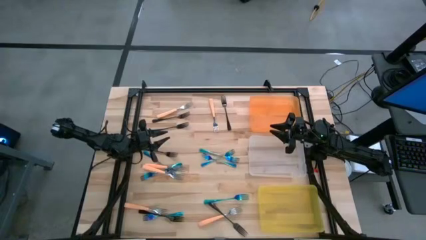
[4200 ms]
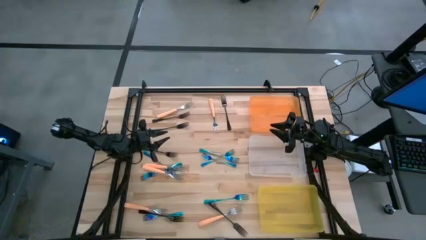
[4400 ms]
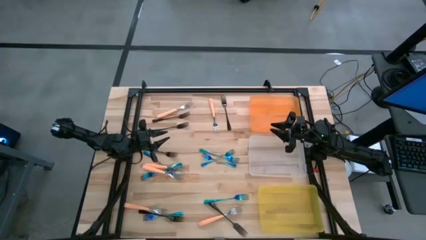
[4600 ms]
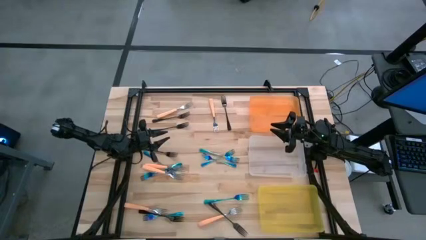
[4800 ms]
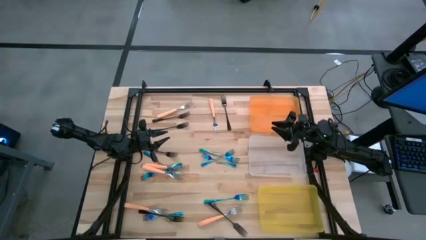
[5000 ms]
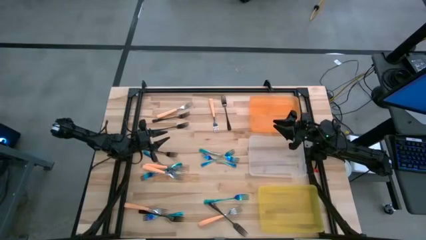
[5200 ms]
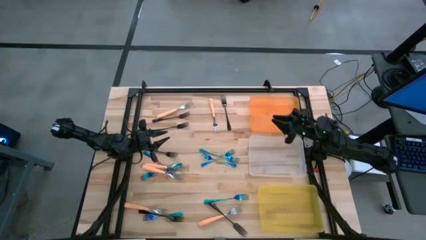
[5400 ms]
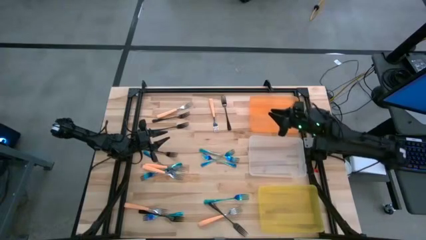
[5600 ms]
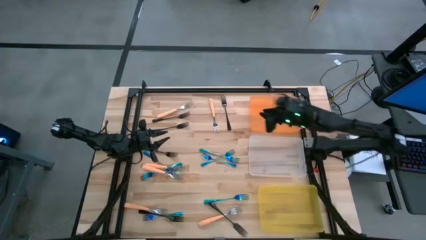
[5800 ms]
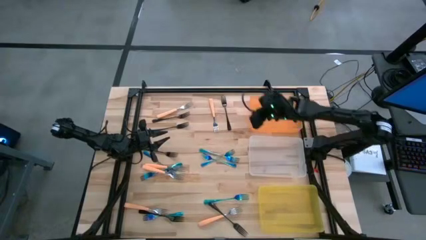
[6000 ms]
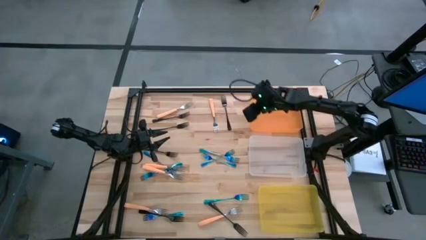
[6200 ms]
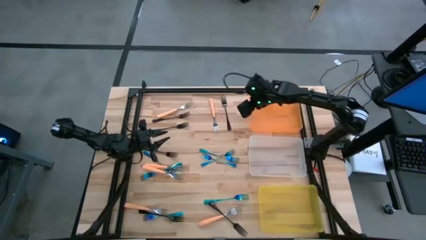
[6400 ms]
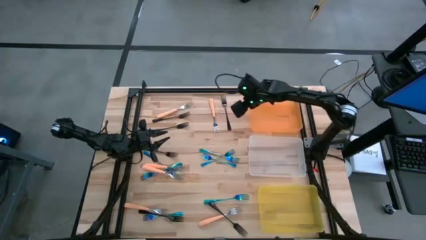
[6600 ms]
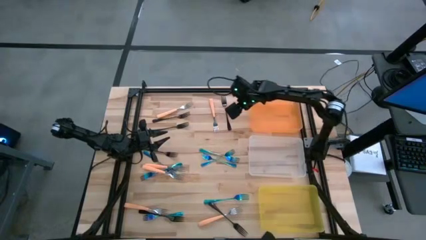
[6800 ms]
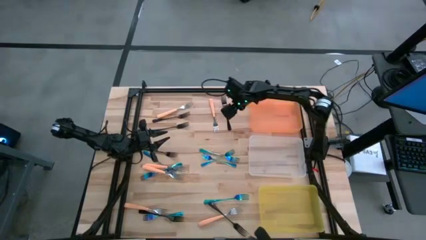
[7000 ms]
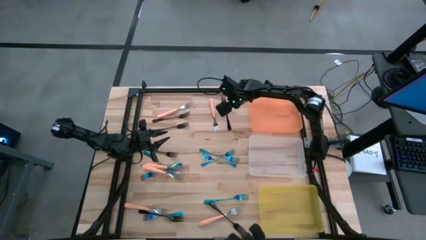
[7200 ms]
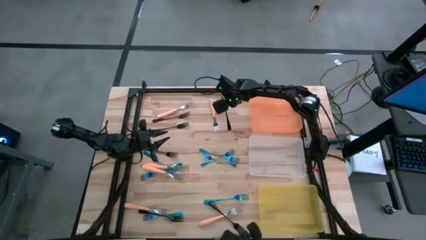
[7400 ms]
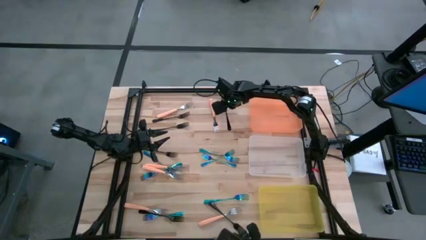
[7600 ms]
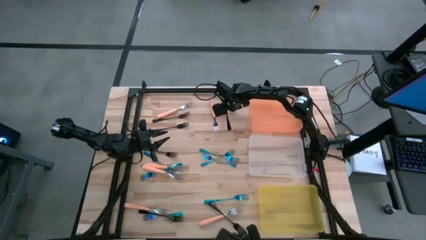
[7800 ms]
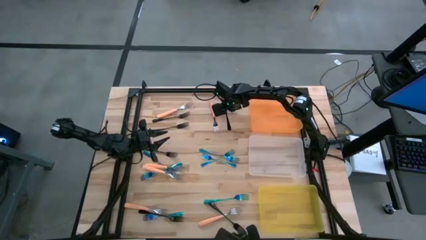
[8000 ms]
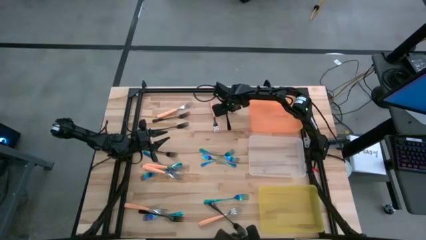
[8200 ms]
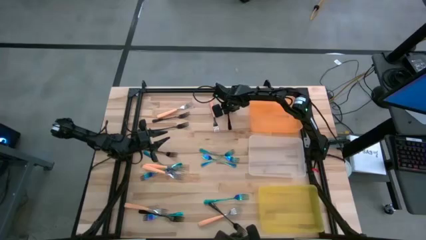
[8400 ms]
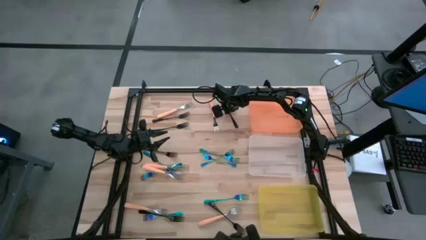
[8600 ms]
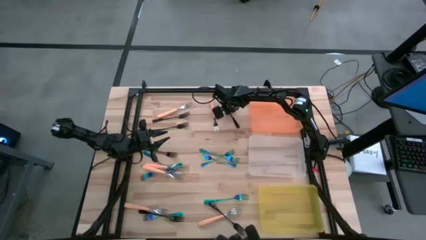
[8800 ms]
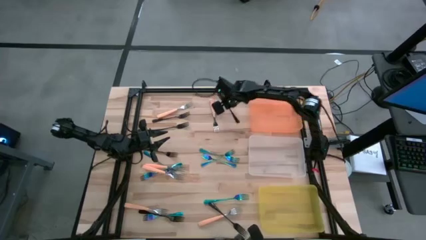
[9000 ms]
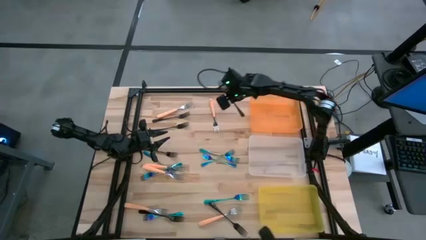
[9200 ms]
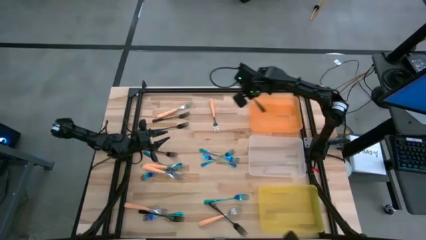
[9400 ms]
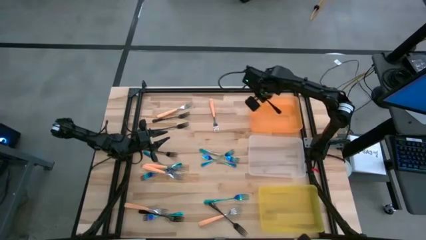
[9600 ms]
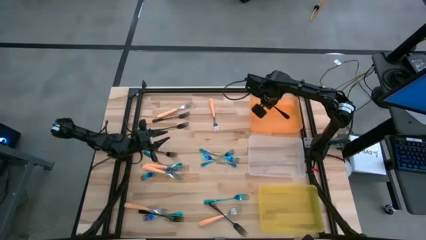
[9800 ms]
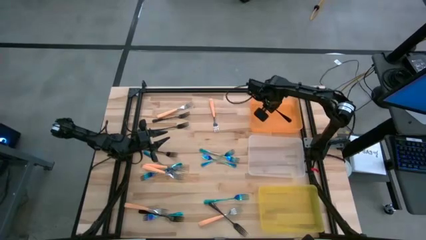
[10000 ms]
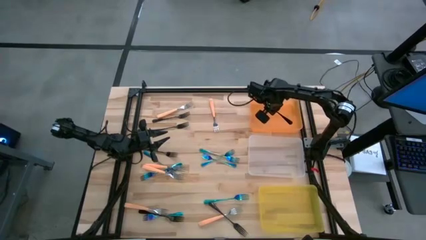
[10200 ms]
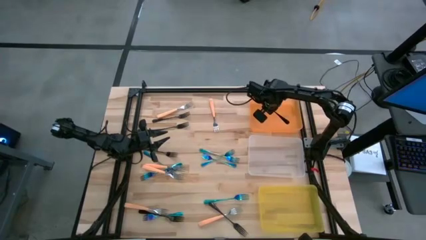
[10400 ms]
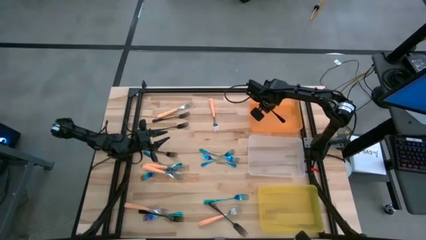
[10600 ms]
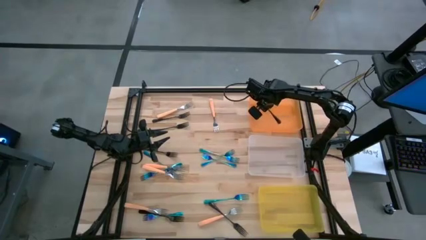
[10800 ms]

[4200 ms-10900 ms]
Task: Sort silverware by color (type)
Put the black fork into the orange bin

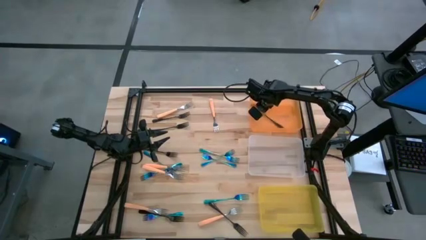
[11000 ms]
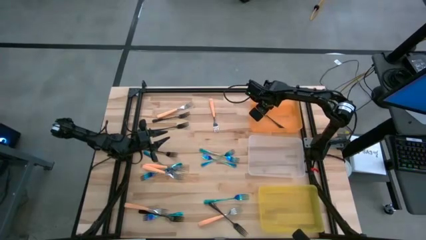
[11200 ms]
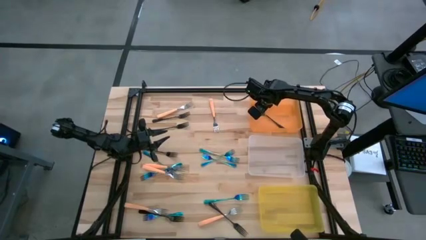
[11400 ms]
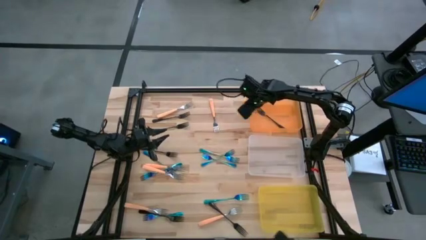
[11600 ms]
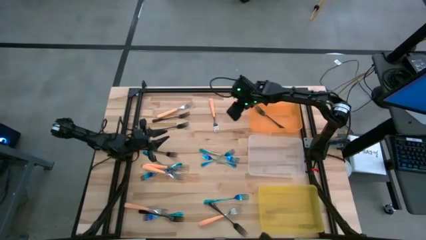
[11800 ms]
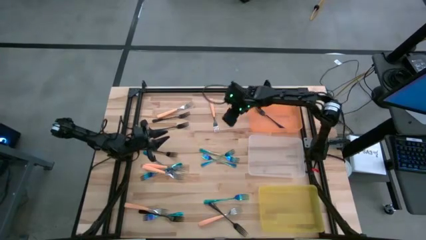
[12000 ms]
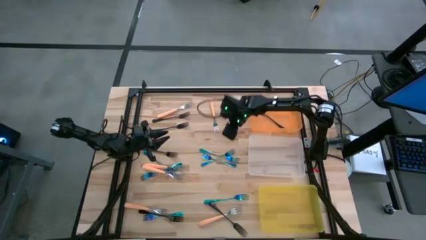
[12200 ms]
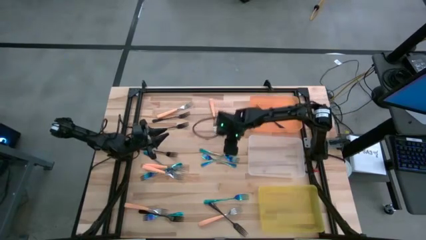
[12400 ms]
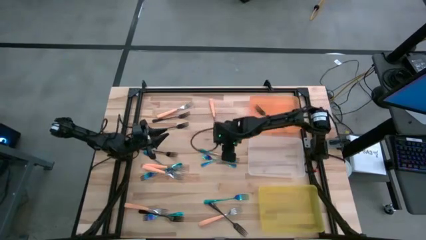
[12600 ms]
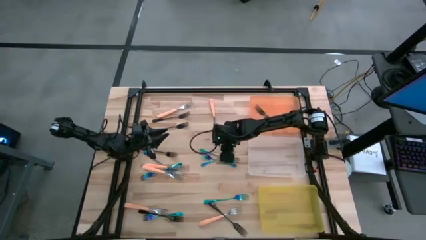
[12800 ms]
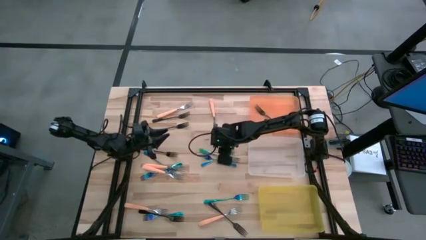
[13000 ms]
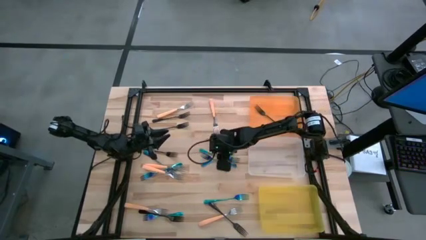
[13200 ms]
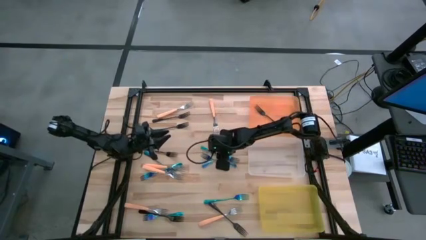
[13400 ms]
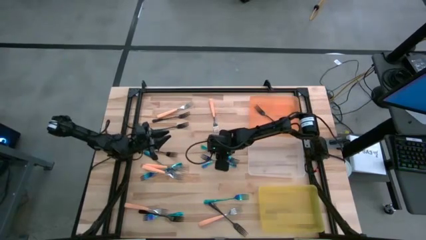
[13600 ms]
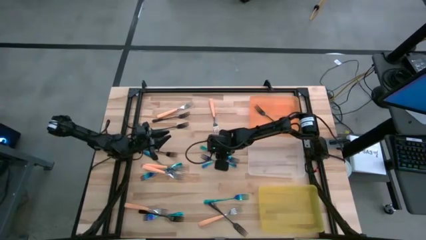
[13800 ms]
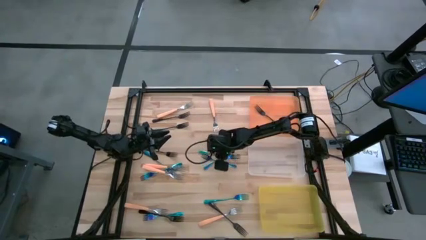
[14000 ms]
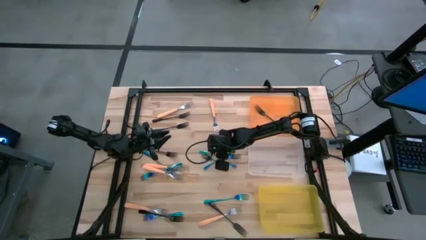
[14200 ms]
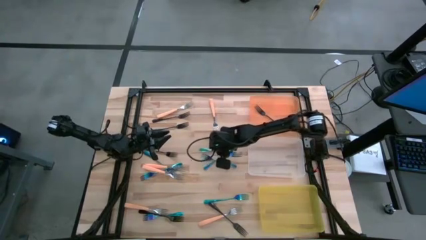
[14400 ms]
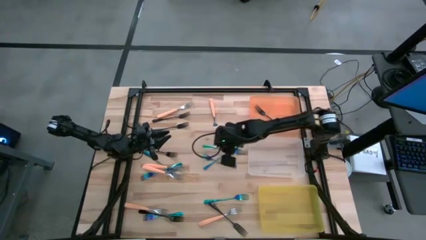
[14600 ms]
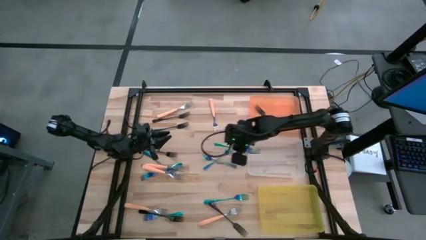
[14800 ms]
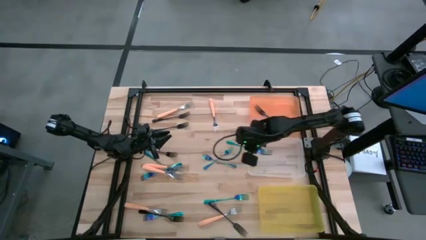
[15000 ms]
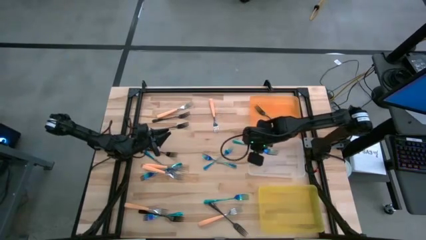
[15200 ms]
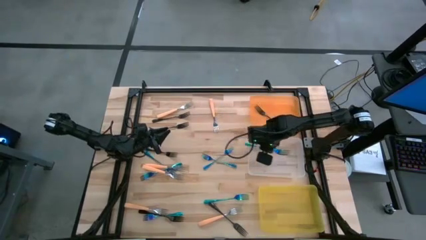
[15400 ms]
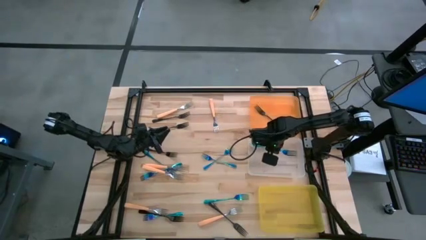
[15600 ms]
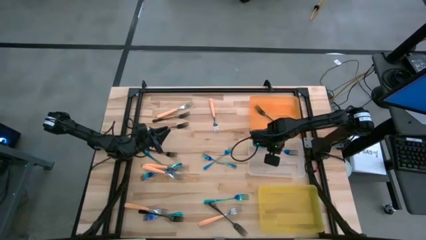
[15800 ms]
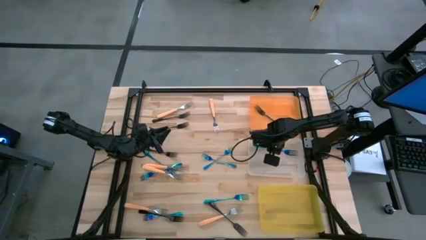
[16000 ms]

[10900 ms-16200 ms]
Put the blue fork into the transparent bin

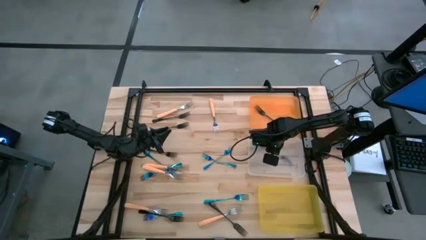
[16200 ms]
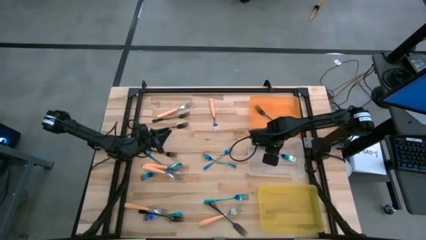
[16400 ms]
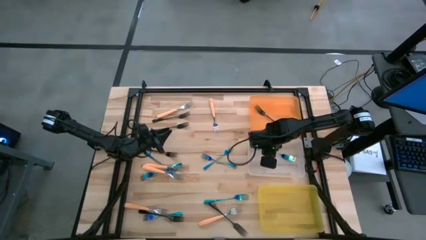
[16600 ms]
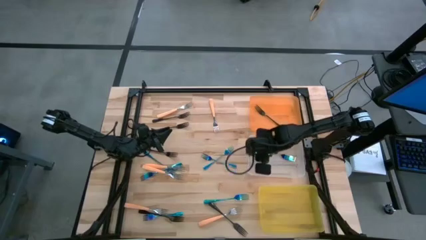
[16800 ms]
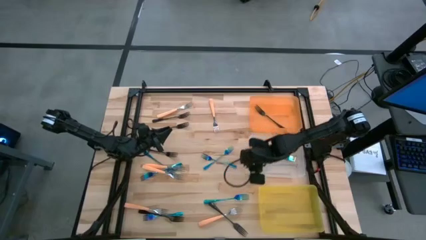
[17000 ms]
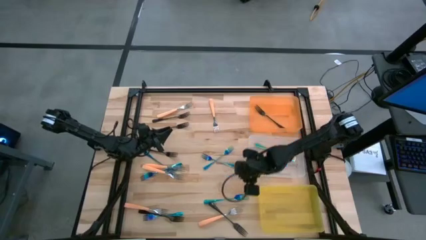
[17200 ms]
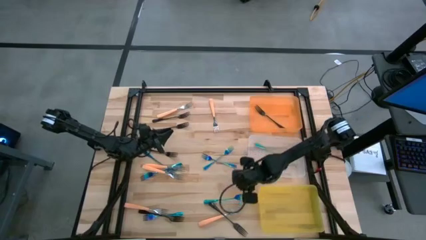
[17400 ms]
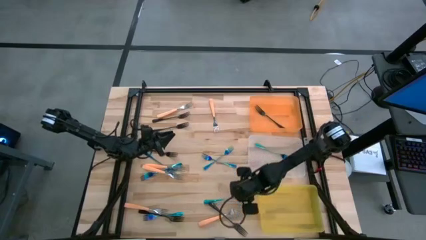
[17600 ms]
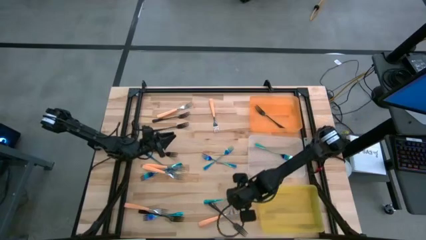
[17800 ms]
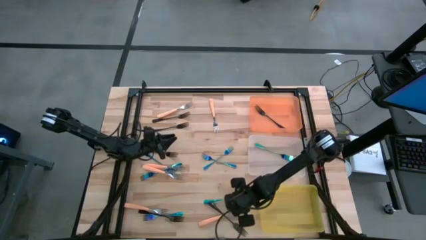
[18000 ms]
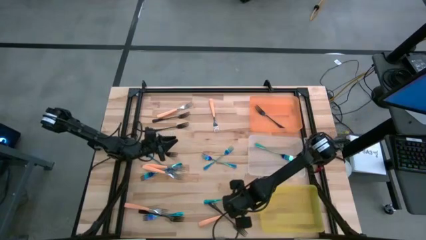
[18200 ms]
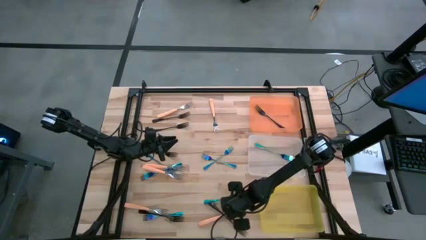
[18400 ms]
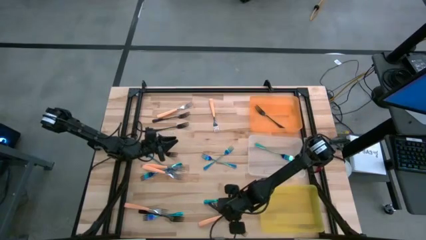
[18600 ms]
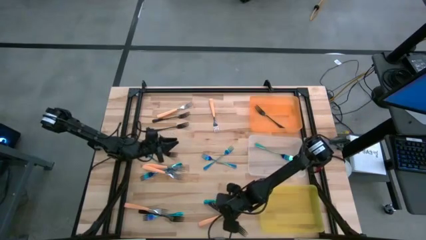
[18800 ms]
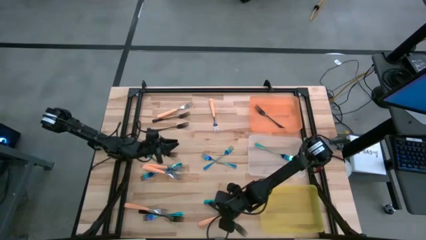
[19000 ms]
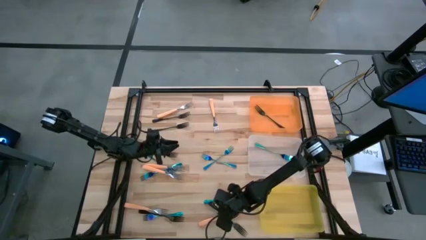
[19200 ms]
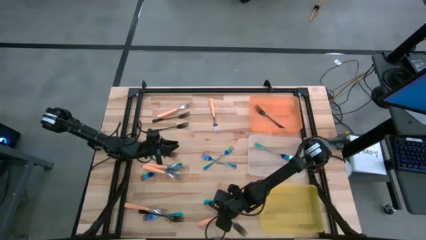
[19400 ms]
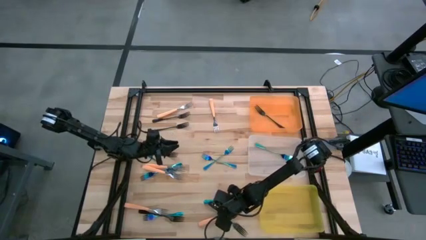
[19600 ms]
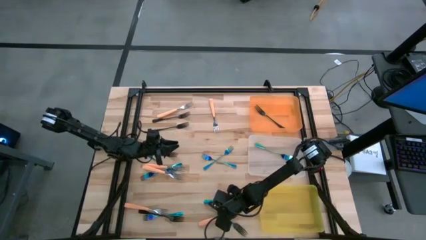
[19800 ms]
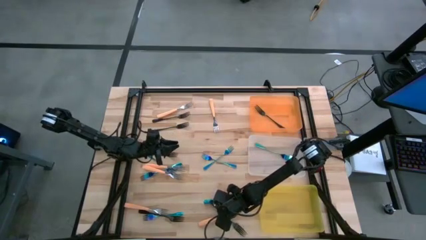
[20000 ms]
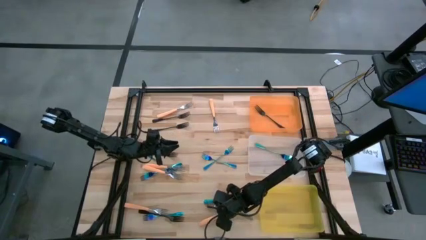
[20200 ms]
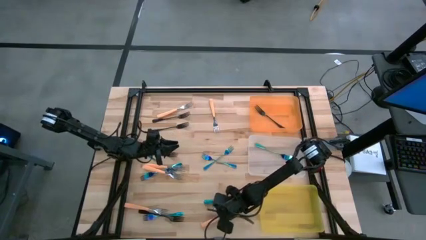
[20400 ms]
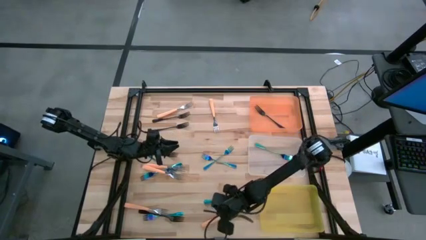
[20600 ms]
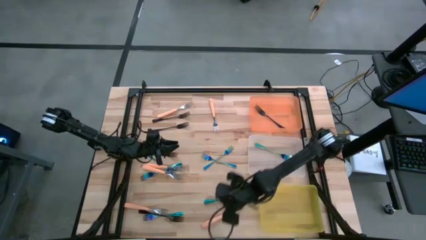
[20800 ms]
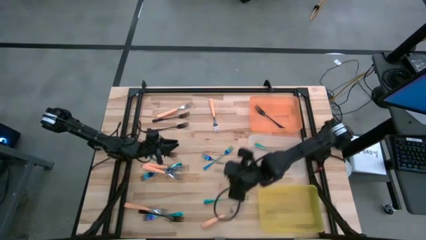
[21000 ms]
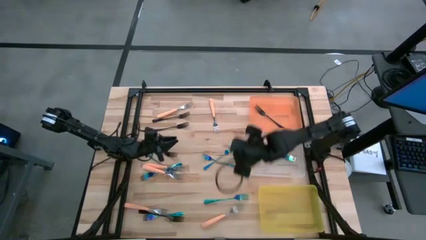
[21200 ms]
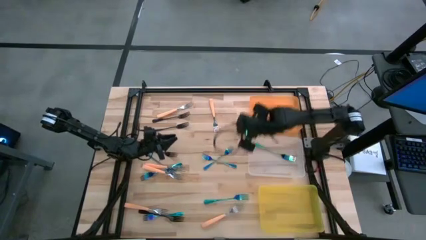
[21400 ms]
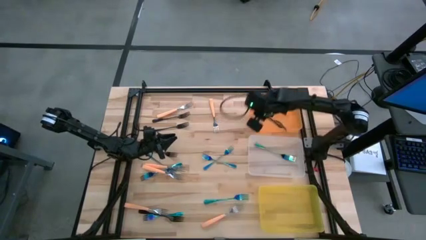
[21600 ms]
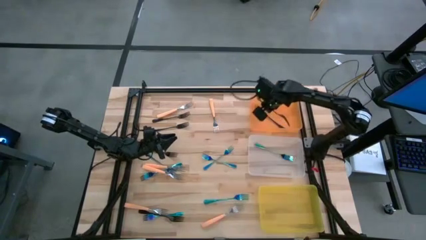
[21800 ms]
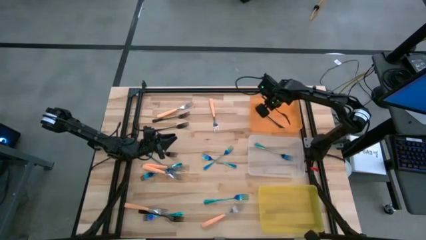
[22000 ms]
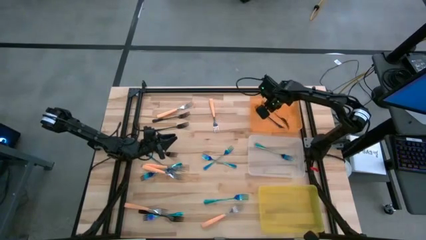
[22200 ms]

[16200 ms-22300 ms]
Put the black fork into the orange bin
